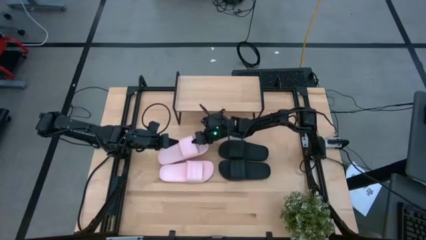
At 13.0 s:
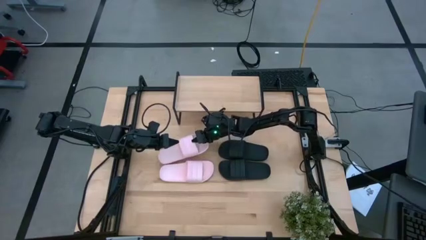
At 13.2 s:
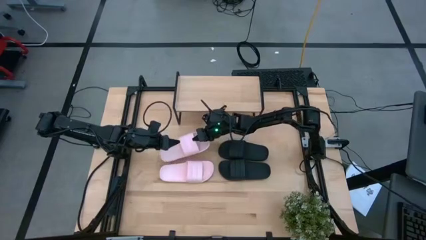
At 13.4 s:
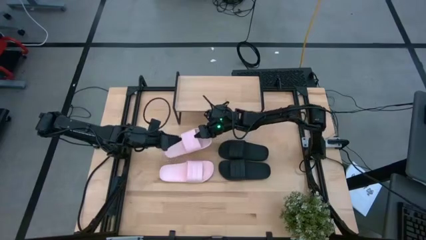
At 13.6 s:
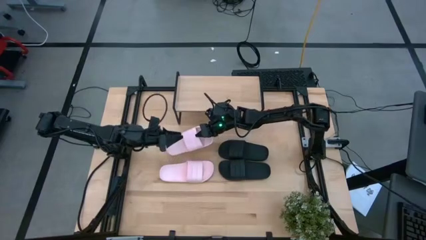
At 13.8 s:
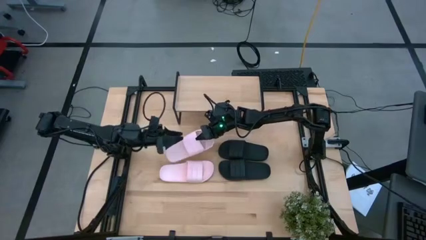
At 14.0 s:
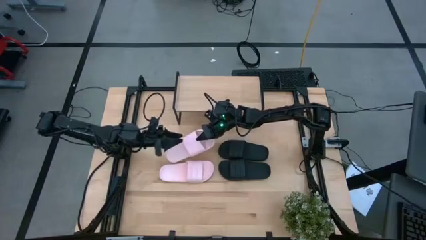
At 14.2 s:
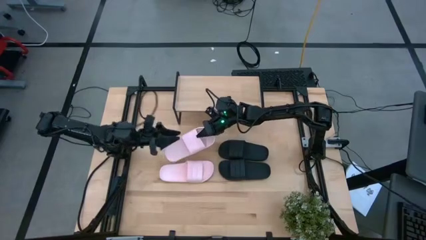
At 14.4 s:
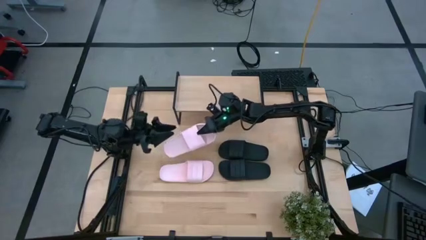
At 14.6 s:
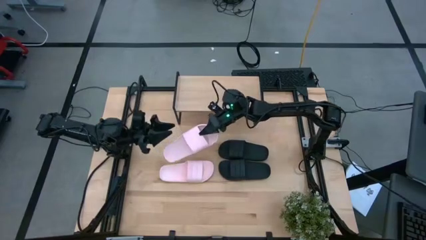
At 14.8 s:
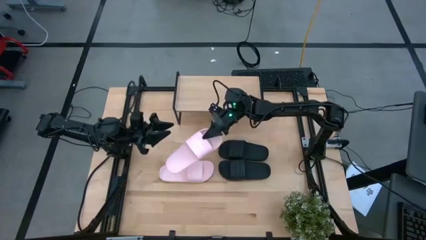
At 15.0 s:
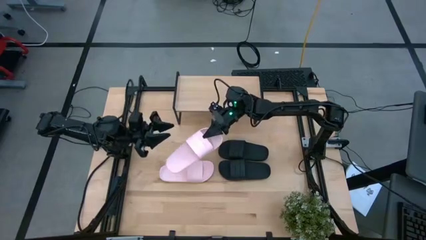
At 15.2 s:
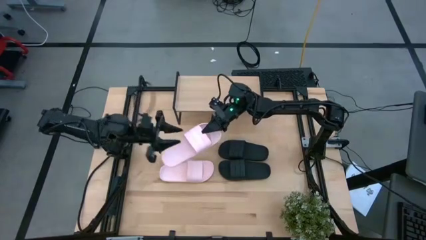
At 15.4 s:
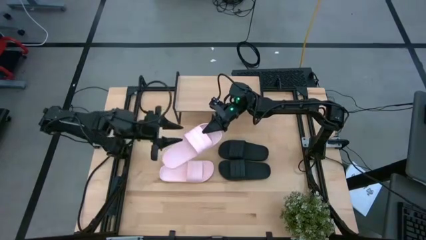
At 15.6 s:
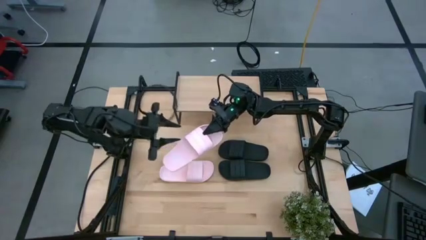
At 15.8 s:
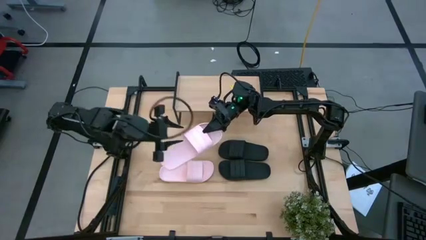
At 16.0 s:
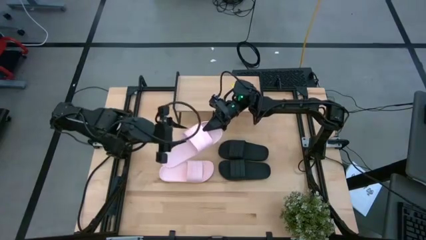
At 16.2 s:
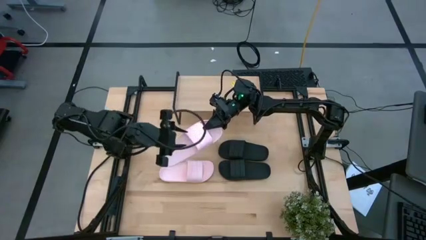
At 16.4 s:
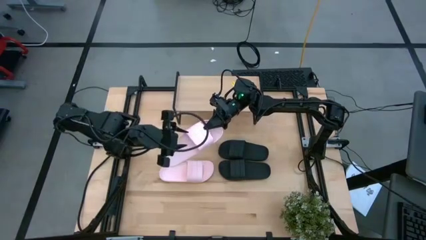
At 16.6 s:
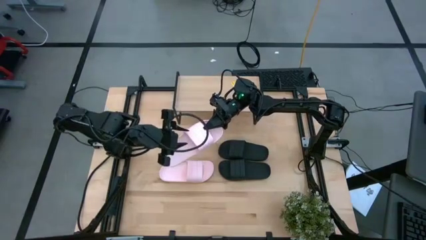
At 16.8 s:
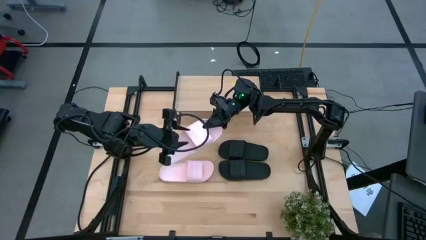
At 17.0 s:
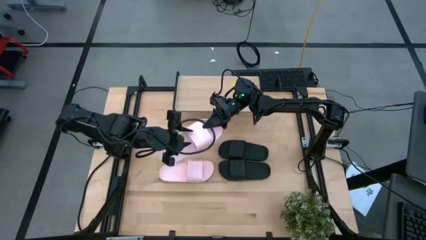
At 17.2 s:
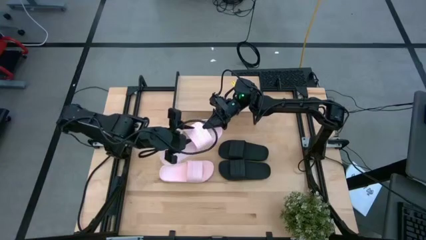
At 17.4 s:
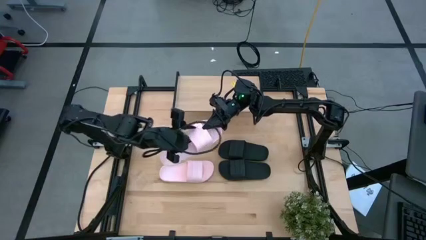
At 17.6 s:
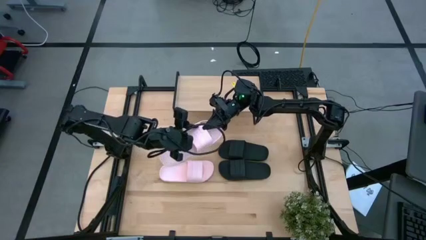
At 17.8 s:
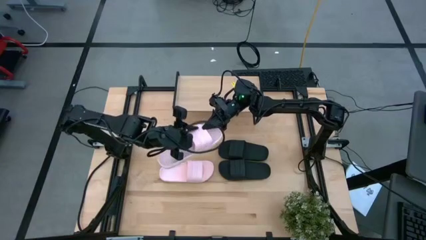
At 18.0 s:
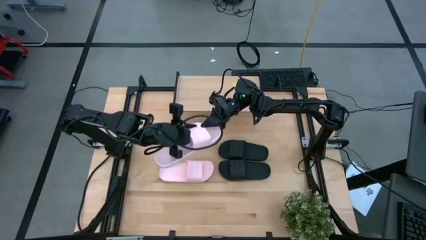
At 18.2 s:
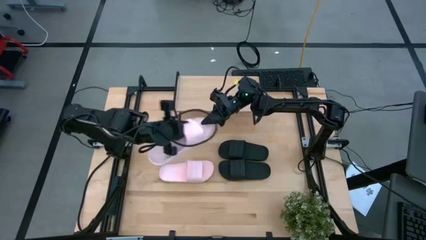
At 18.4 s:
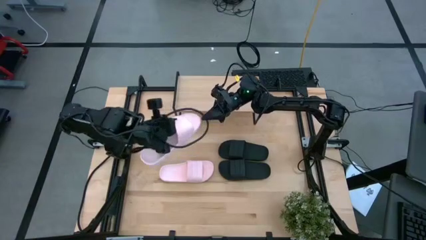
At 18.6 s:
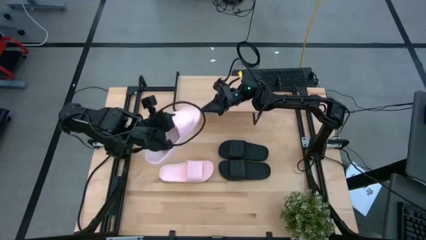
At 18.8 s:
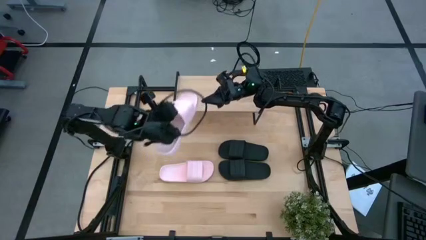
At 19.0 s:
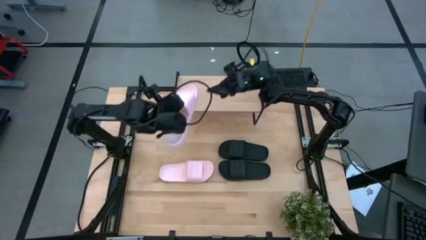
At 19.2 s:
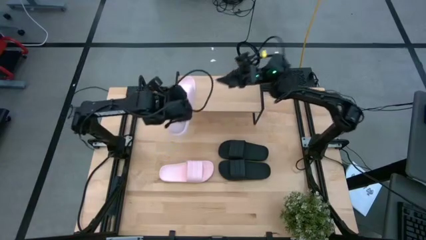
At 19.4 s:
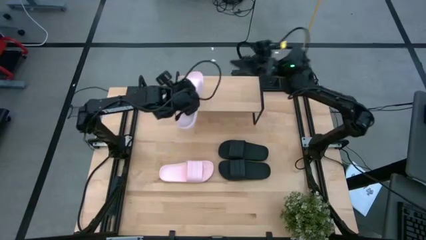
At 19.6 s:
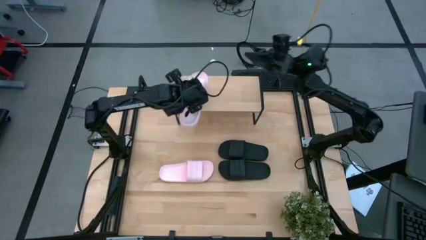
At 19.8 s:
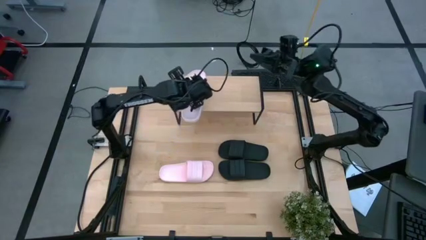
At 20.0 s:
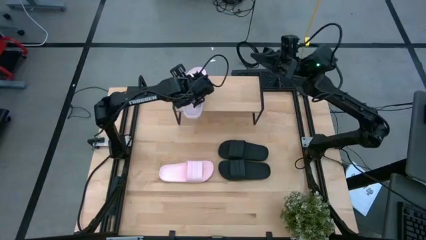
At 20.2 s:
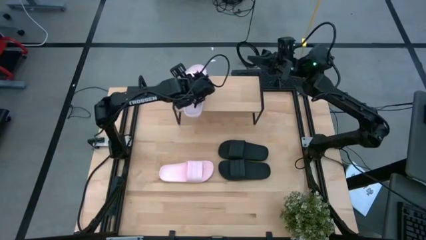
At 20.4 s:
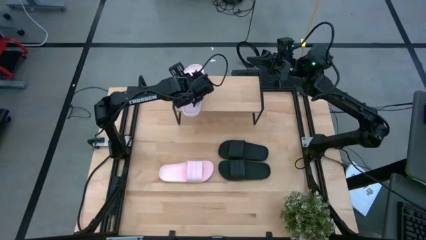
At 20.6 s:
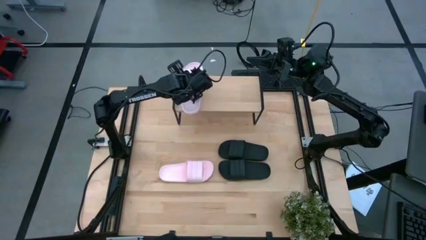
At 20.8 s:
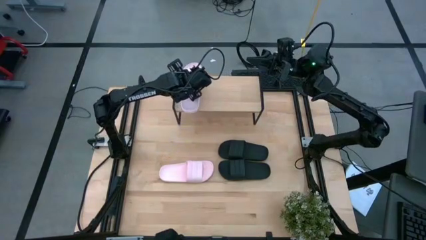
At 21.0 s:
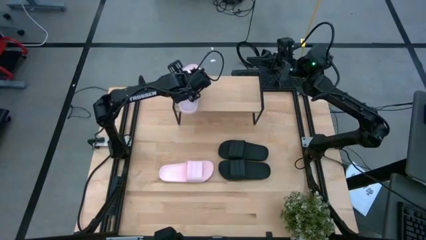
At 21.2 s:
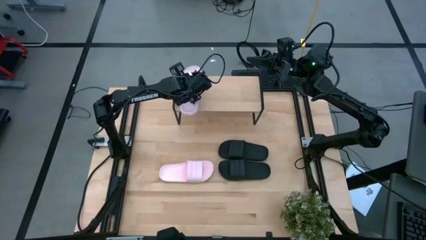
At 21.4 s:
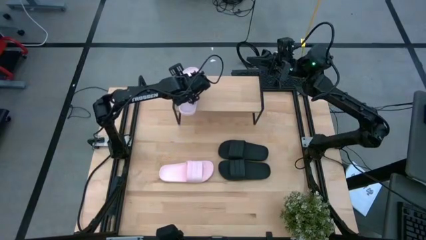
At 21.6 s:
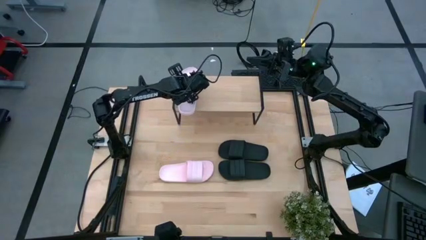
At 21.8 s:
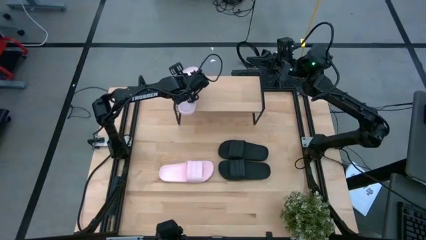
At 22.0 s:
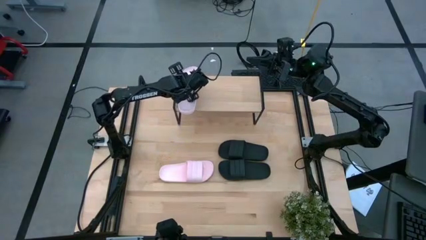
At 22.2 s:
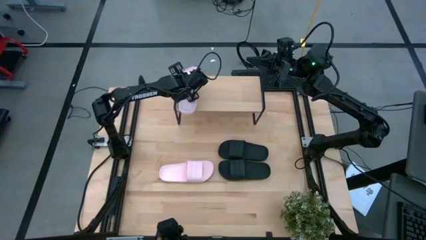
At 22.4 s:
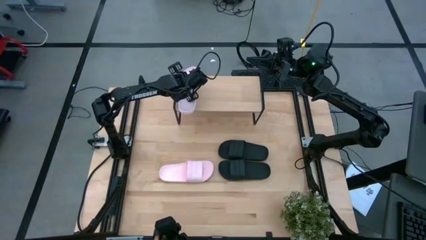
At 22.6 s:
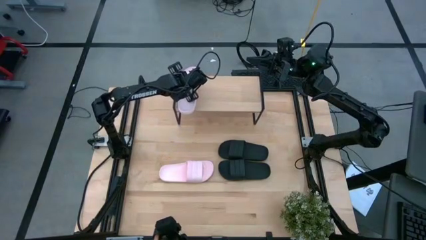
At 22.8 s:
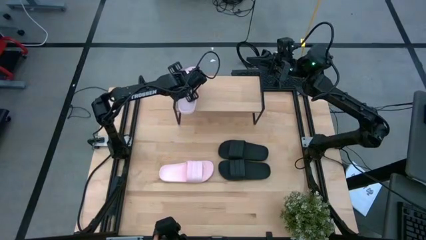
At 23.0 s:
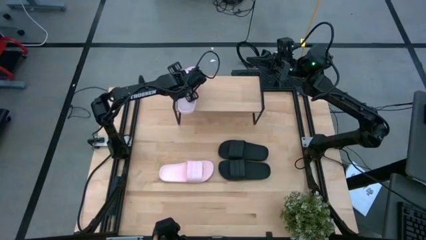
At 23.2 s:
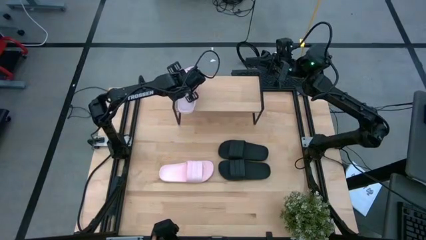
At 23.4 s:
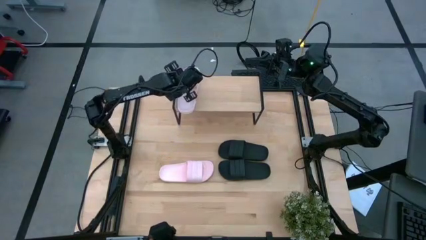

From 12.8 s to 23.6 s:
Task: Pick and place slides into the shelf
Put the top pink slides on the shelf

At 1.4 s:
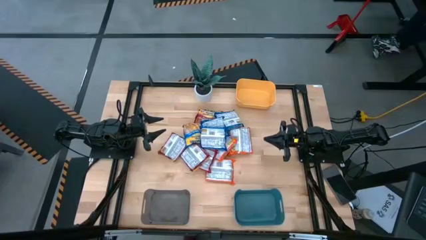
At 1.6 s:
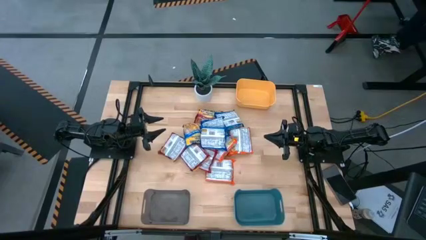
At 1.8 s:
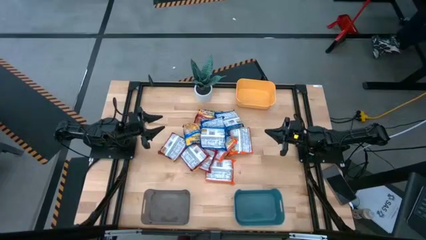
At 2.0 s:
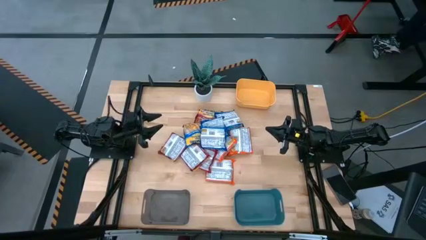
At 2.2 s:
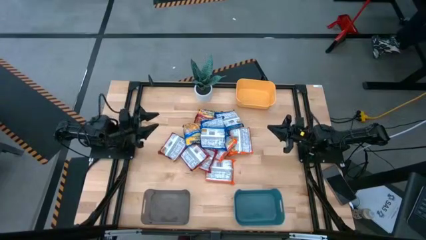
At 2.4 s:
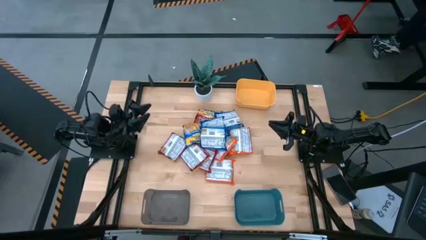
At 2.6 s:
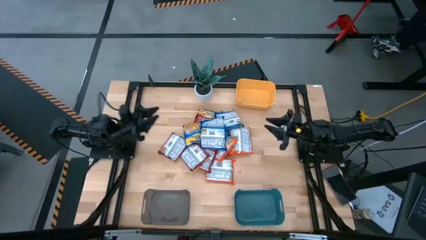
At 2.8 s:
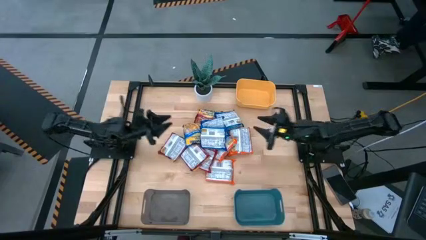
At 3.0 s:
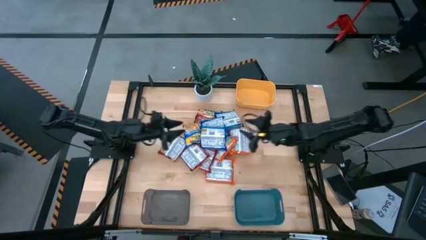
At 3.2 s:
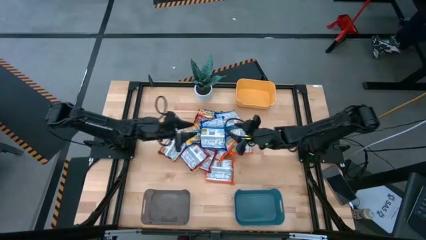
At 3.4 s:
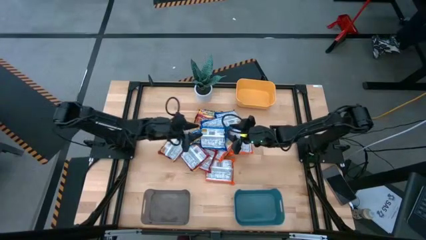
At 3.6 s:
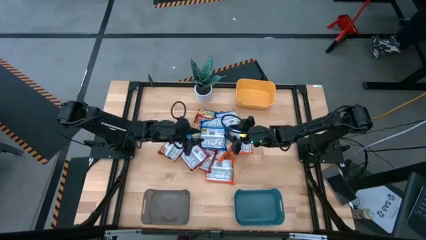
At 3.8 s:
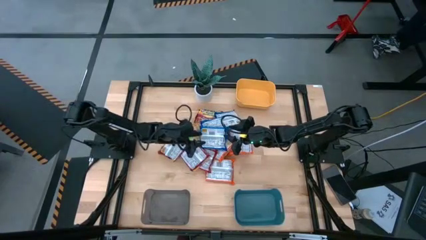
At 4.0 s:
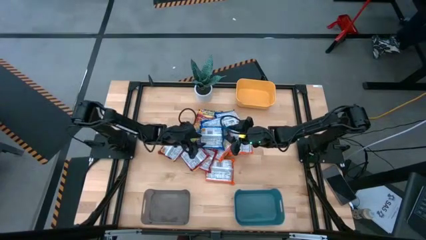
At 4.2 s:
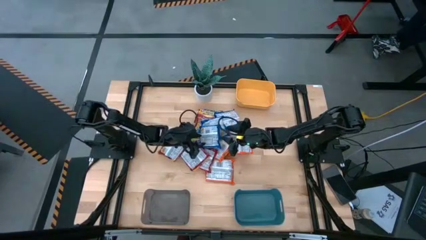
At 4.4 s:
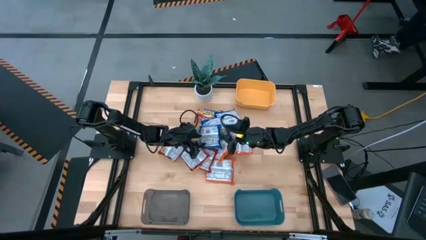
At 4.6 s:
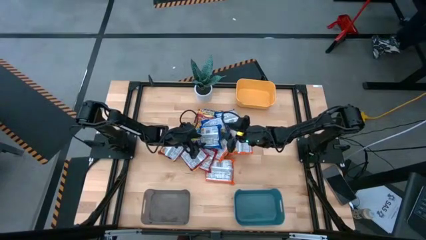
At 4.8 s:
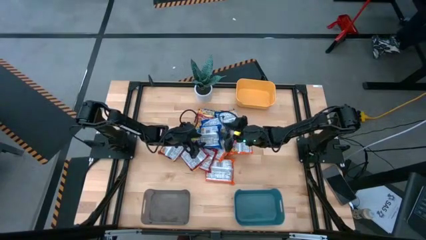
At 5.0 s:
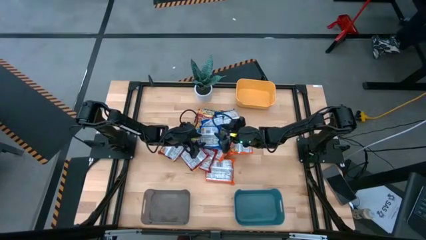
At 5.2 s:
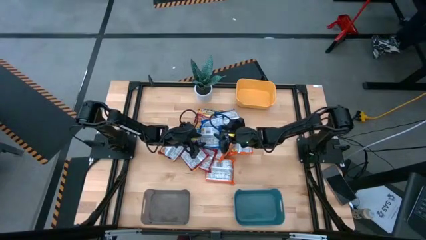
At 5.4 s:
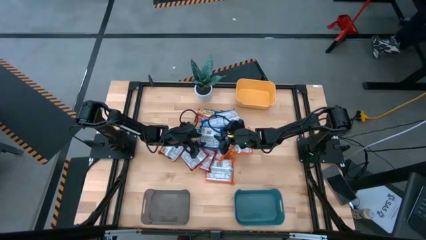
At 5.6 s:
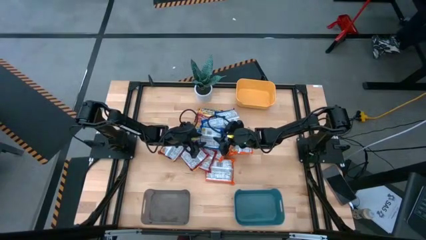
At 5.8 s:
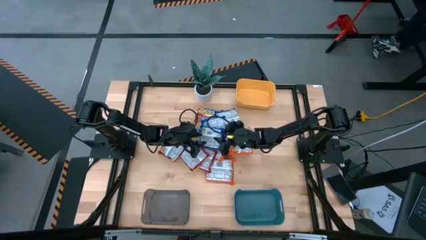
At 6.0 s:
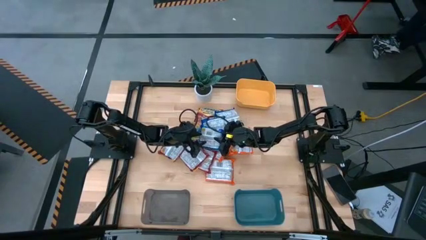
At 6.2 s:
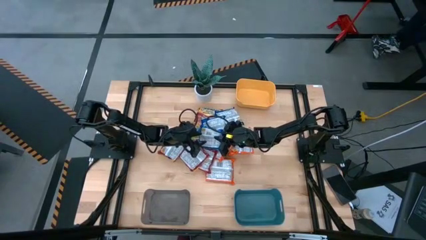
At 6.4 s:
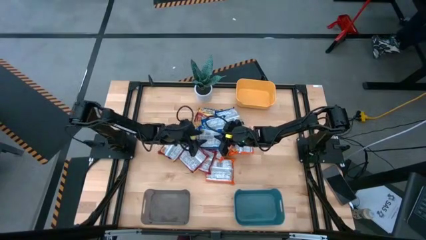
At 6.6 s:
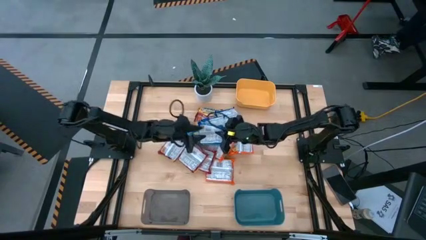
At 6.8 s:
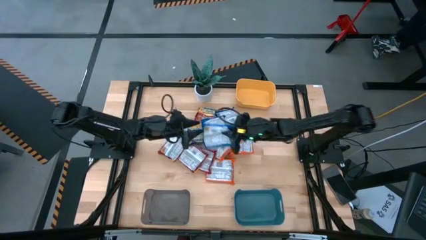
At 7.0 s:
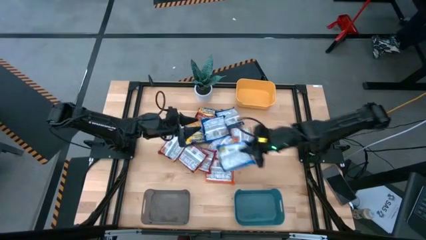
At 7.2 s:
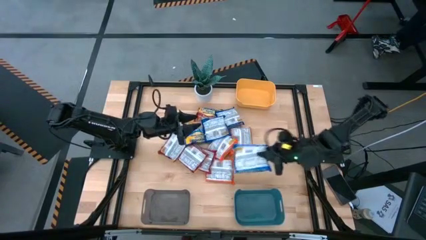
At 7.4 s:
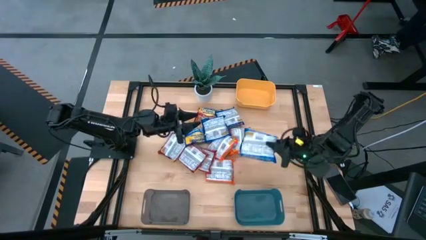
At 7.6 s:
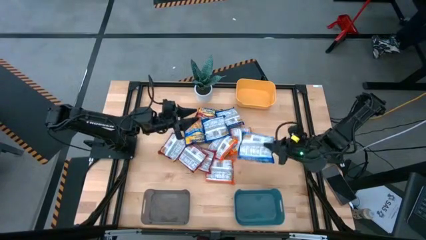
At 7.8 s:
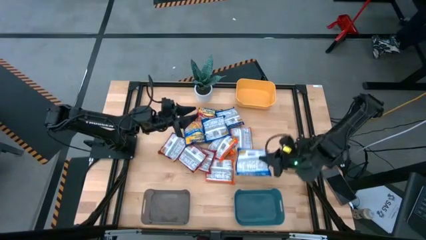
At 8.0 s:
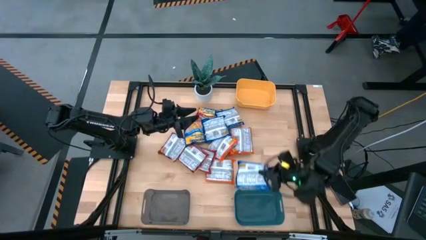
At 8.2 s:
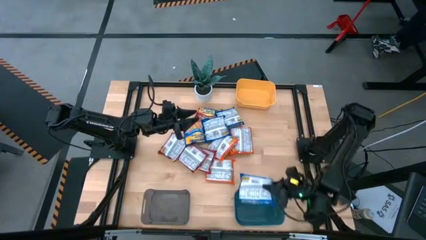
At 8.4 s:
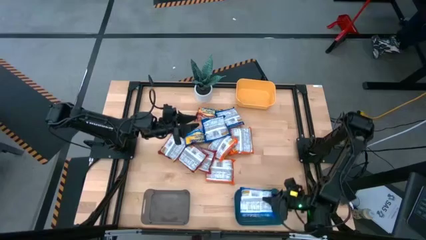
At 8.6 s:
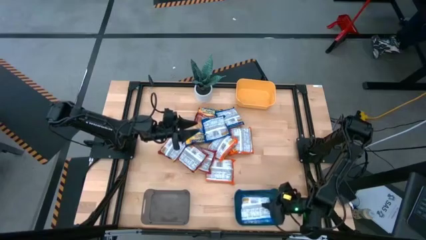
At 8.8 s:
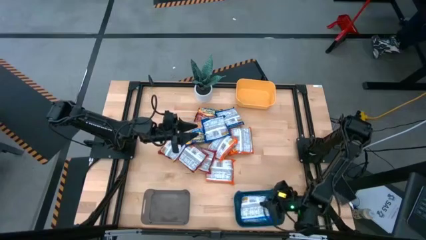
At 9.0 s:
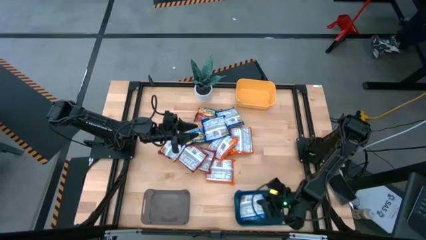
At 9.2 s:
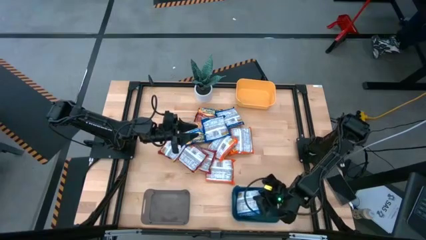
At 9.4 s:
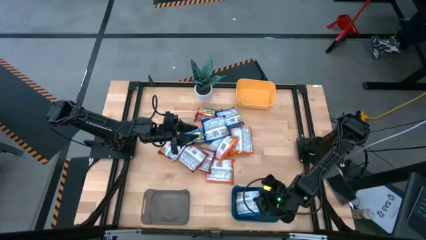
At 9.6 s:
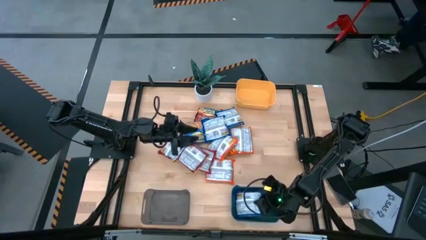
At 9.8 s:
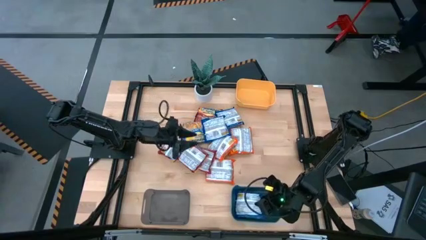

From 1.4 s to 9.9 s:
Task: Sort Maruchan noodles
Put the blue noodle pack into the blue bin
